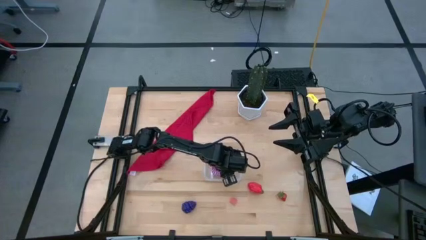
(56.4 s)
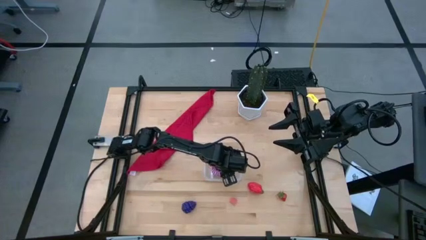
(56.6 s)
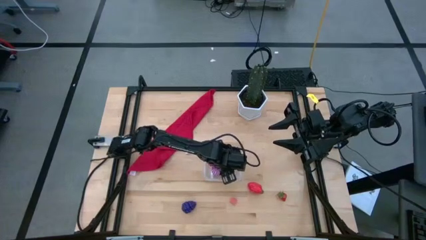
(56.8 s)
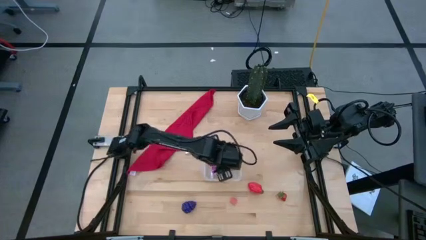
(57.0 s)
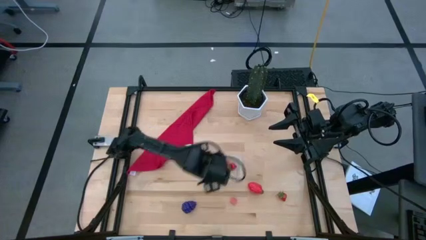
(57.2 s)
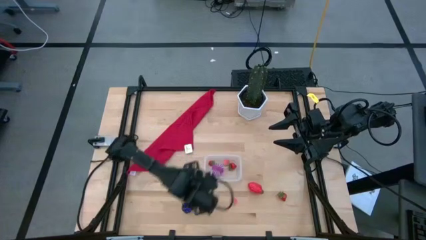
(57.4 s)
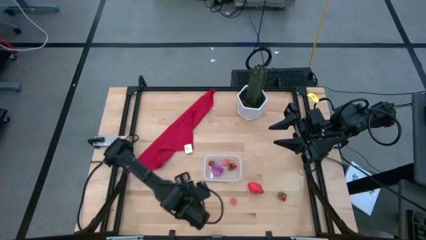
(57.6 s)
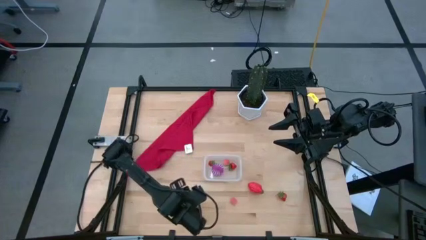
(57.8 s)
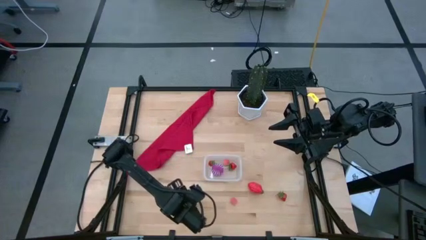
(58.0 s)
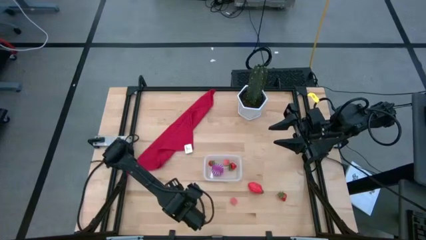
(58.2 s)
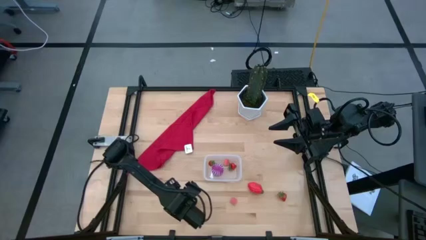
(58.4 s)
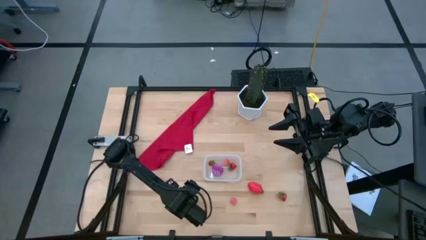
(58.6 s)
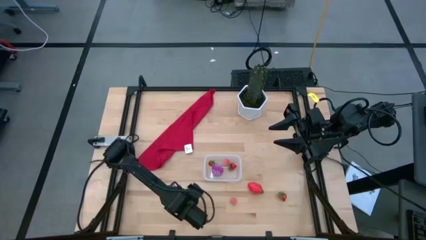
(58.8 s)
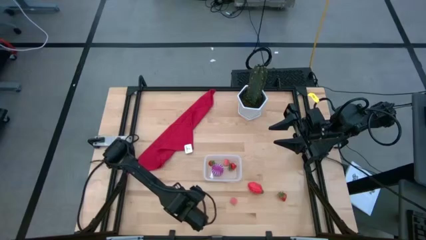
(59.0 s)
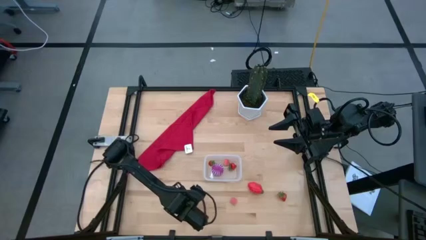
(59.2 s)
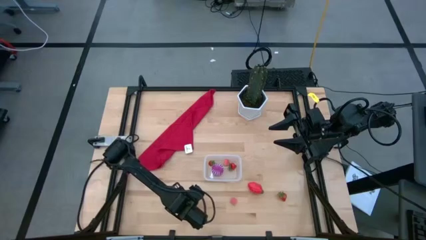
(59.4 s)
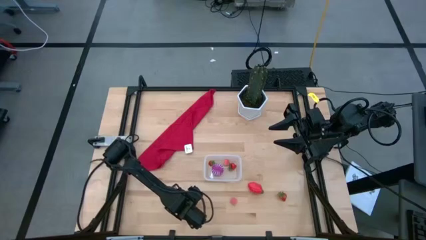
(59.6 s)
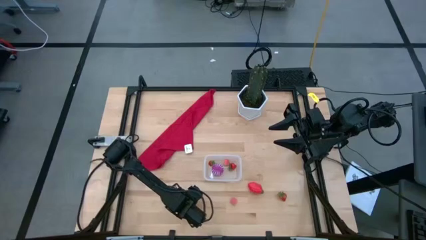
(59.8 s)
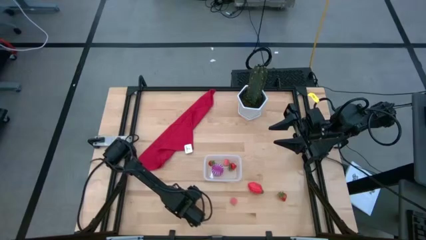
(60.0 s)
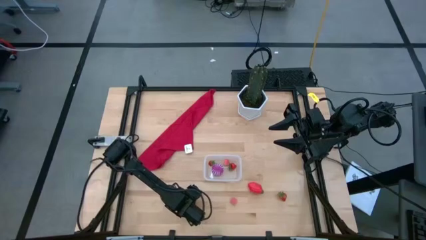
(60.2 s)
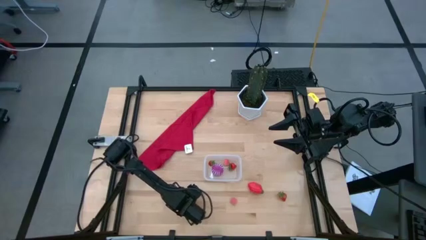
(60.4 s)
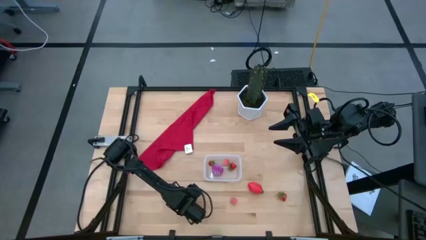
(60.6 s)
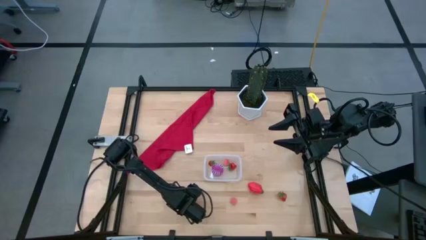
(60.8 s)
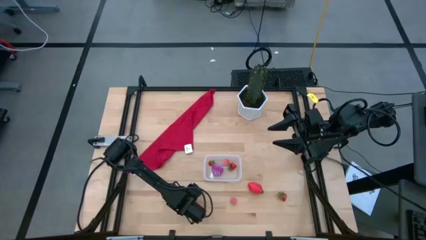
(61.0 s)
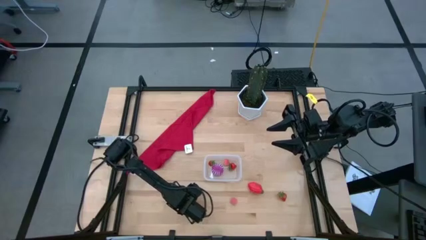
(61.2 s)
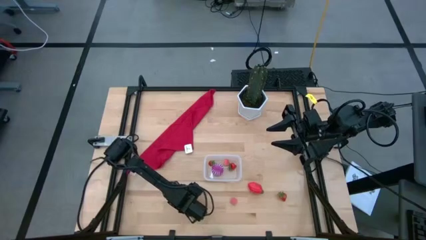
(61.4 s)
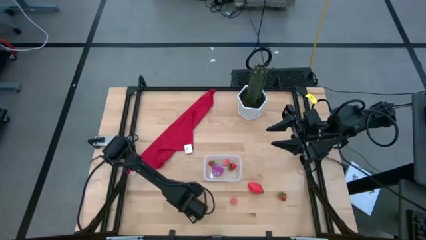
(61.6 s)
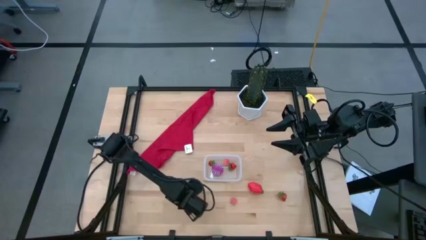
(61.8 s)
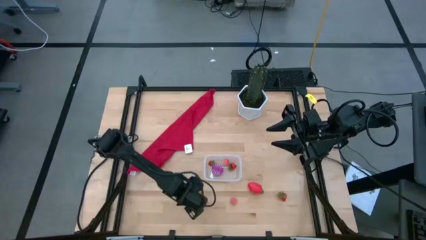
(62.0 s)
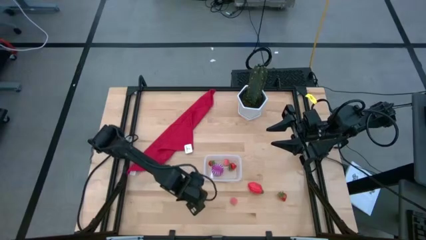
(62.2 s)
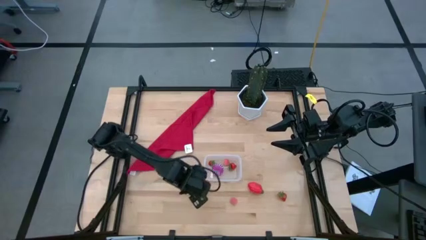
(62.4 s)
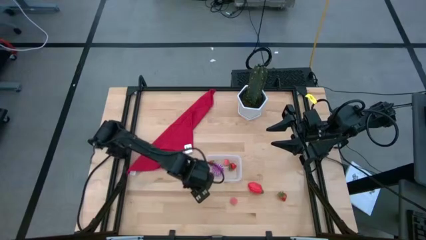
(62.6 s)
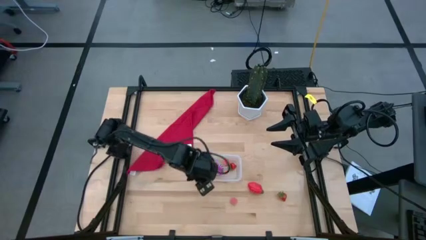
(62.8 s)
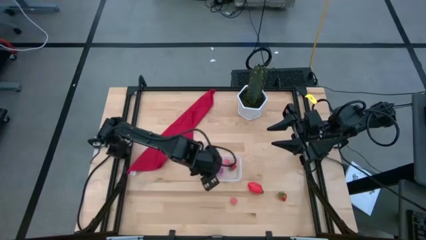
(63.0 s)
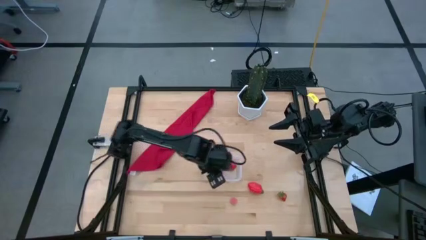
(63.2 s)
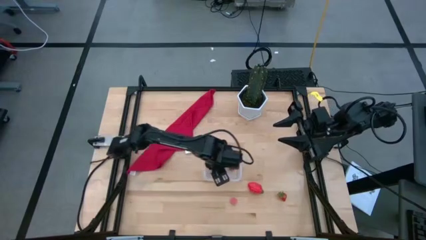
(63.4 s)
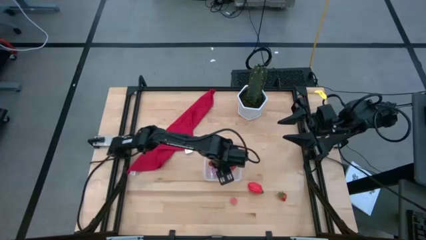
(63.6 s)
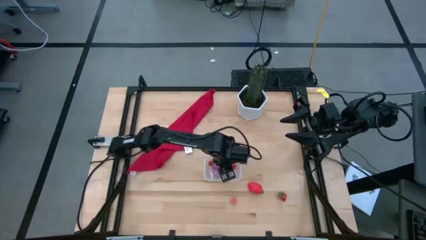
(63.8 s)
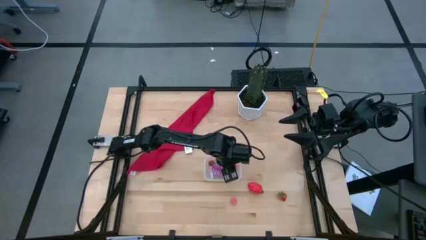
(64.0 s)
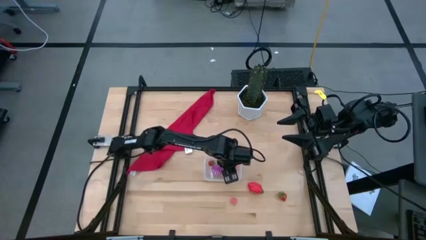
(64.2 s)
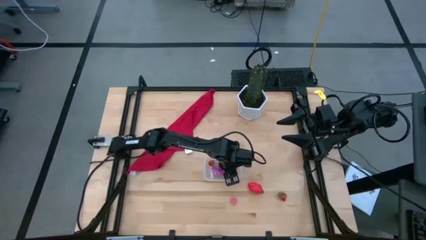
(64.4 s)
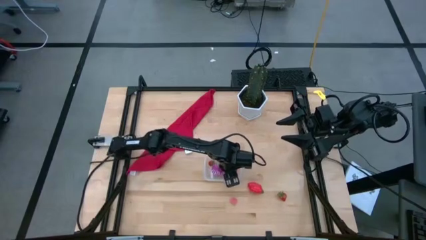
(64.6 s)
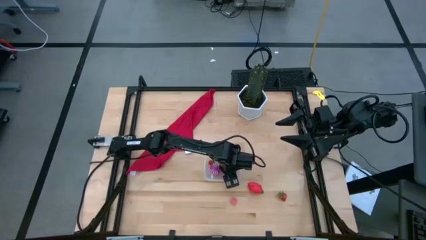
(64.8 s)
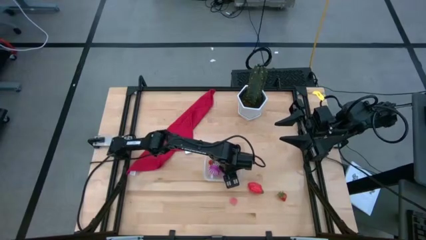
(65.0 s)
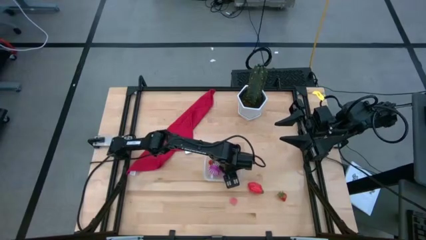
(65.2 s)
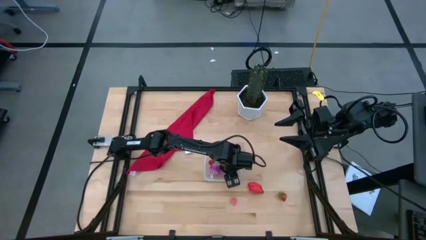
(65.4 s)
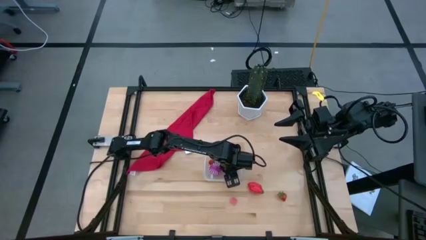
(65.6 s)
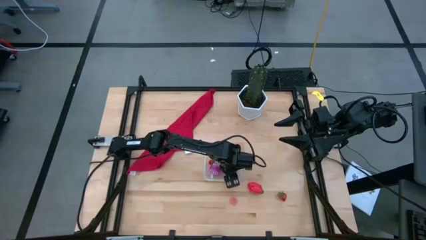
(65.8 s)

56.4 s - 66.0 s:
Task: Pick and placing Produce into tupperware
Put the blue raspberry into the transparent bin

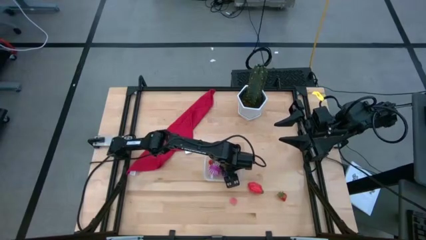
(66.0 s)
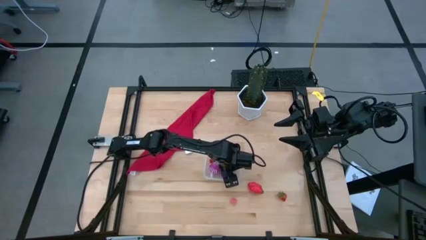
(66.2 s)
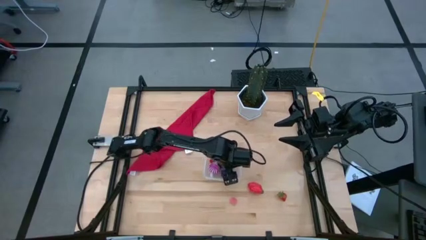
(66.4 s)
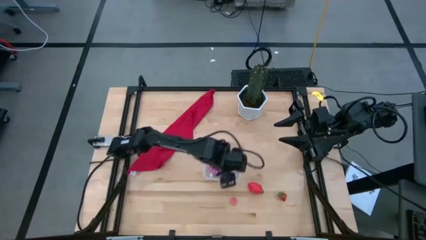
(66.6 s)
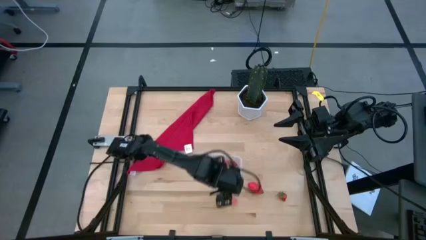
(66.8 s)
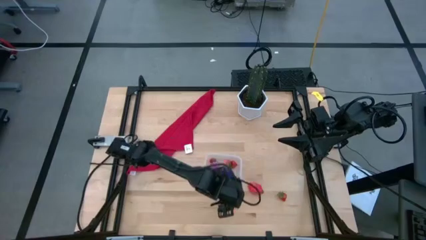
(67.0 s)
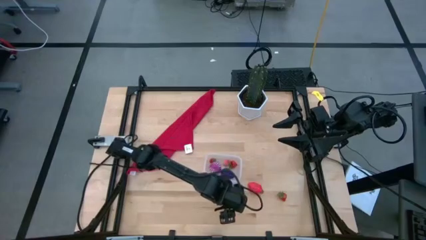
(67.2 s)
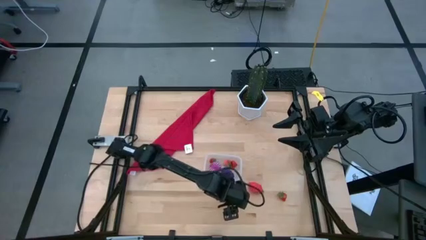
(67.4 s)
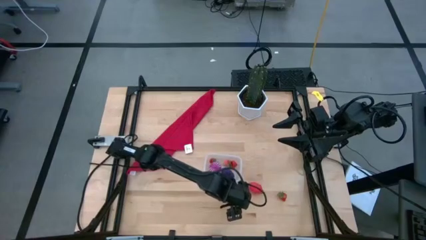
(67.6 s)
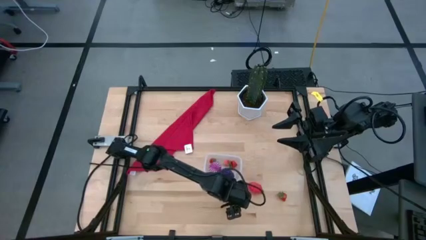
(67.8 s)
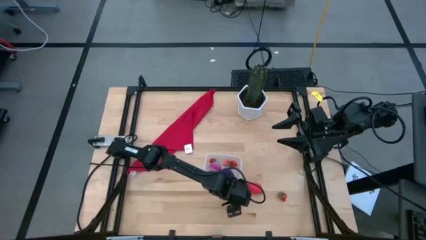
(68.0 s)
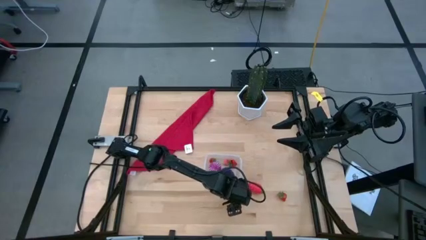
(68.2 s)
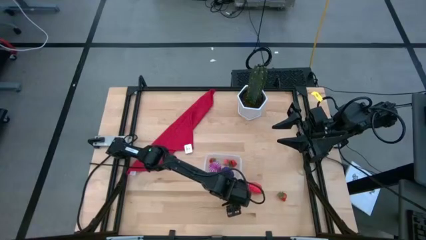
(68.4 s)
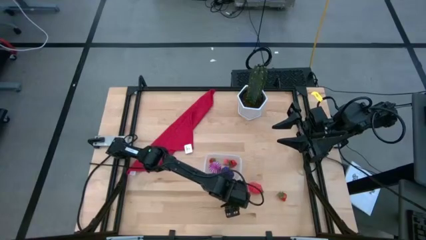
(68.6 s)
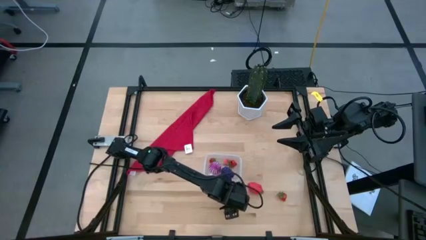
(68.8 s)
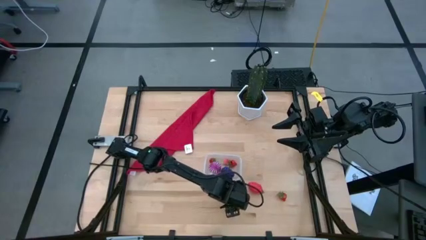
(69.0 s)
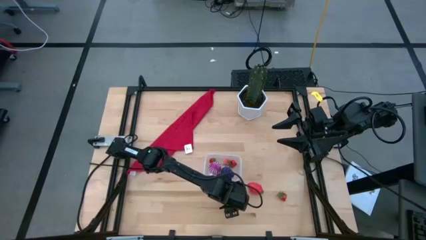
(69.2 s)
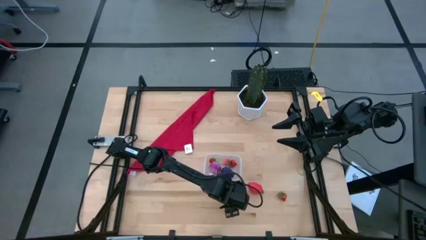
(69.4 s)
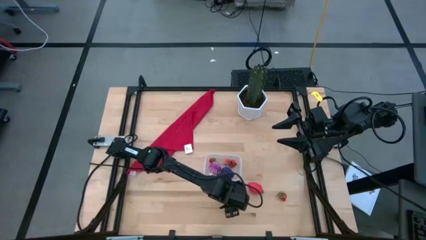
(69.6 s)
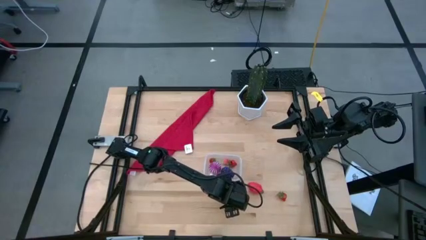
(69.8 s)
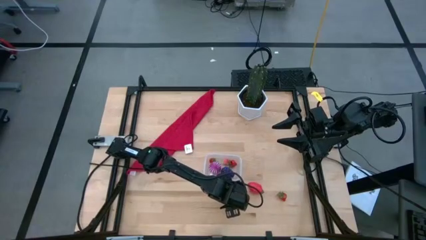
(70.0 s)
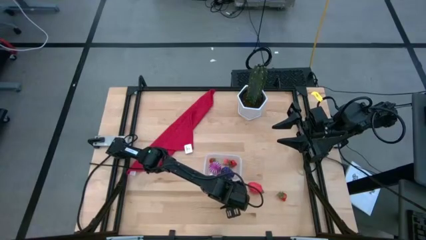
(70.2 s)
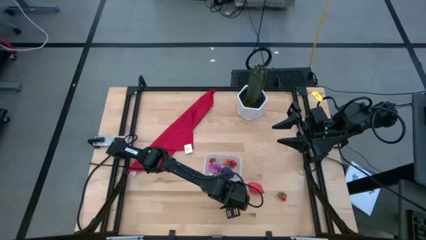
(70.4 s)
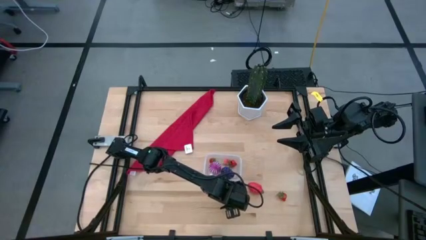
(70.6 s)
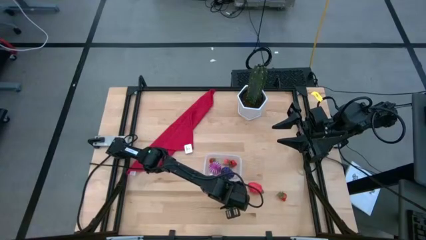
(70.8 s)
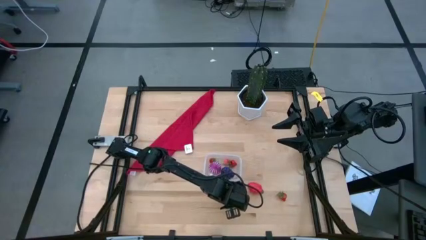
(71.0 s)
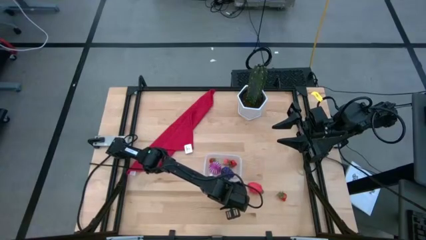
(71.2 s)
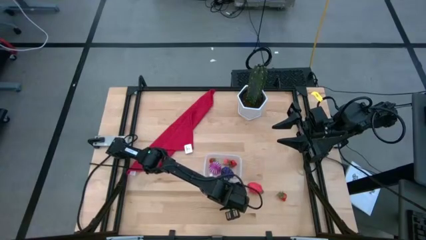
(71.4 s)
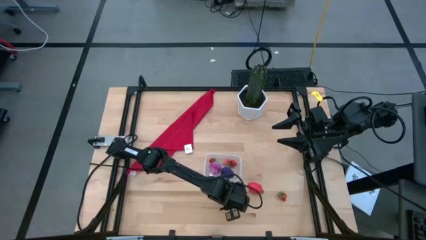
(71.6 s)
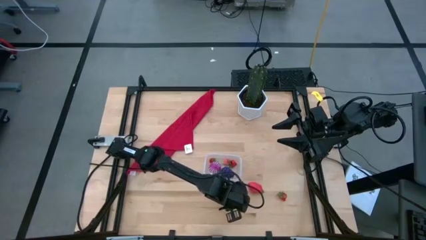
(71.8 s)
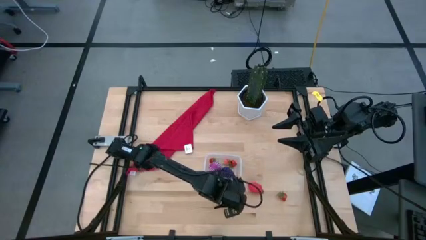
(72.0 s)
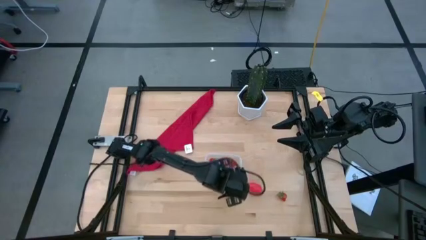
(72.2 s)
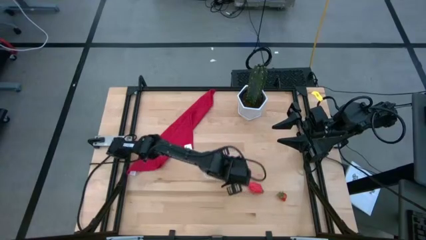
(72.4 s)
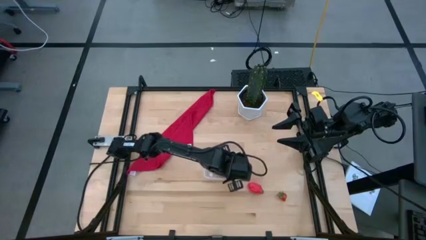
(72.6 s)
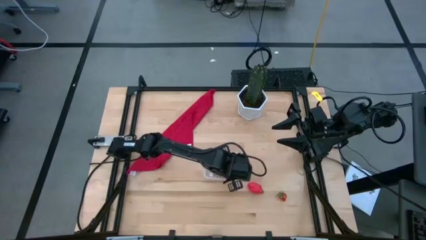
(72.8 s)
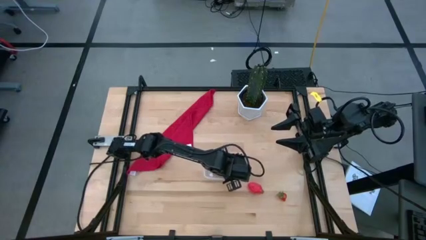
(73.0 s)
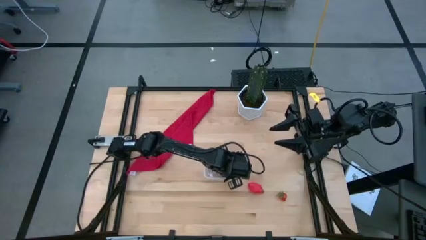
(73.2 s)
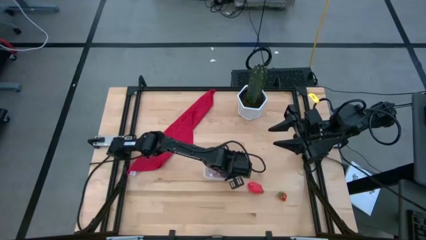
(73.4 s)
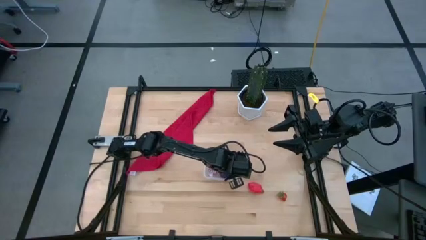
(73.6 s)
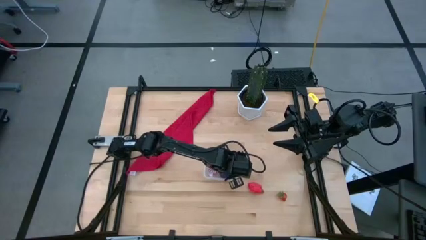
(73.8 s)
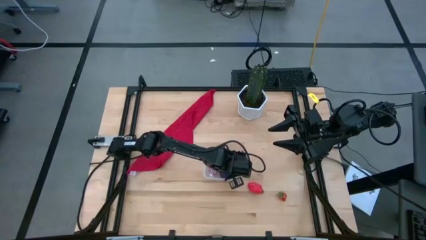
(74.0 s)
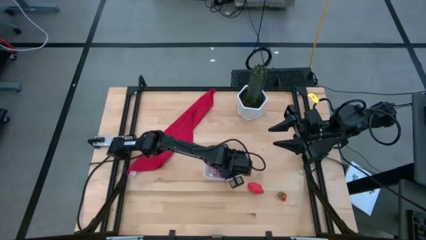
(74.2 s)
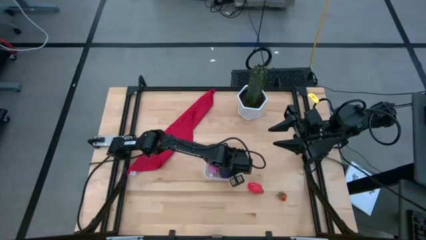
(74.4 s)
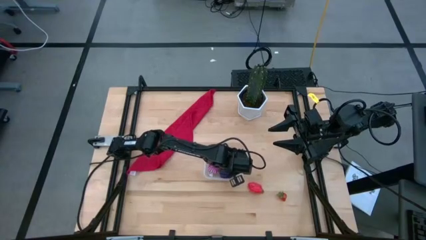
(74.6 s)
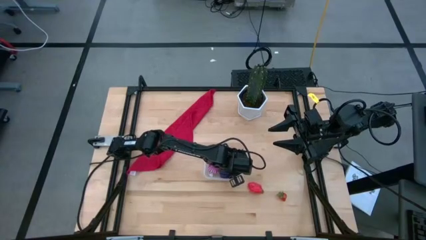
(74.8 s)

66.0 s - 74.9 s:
Put the purple peach into the transparent bin
